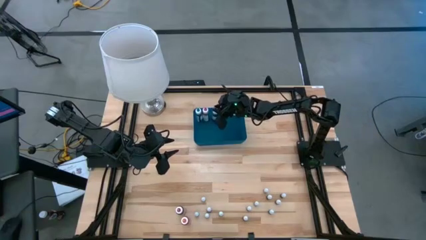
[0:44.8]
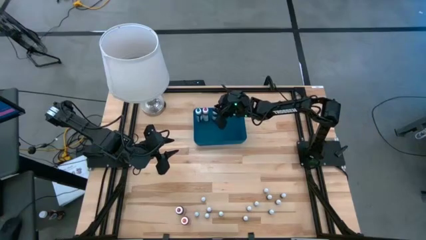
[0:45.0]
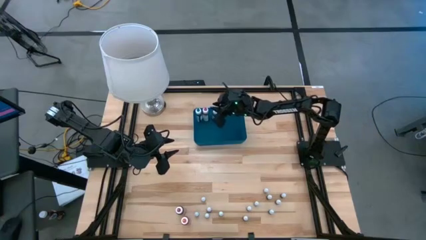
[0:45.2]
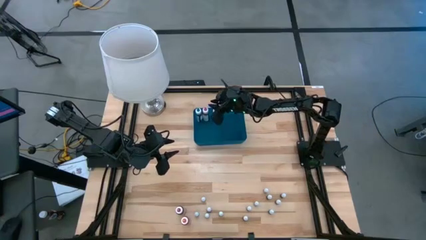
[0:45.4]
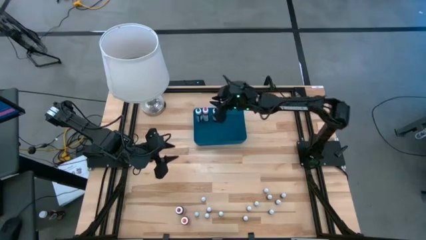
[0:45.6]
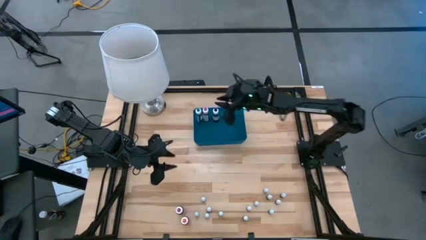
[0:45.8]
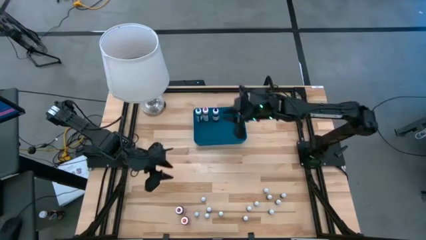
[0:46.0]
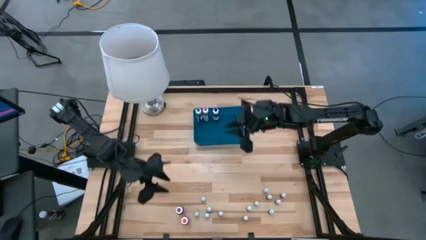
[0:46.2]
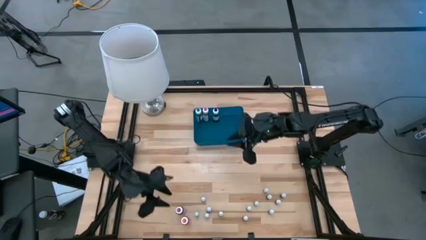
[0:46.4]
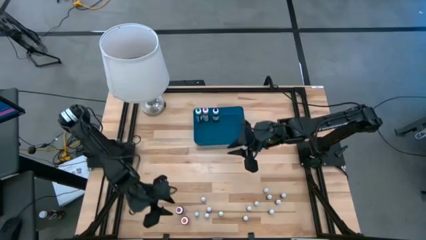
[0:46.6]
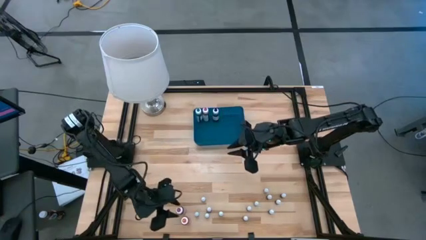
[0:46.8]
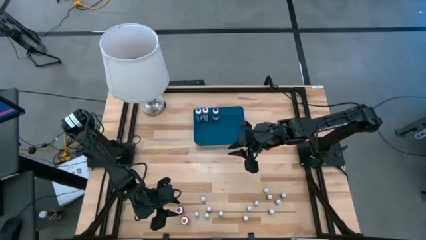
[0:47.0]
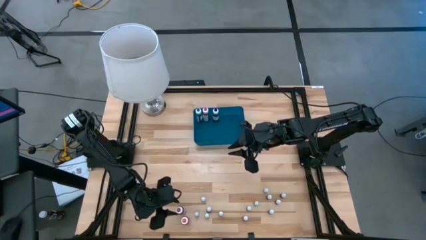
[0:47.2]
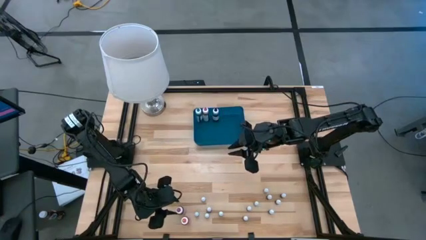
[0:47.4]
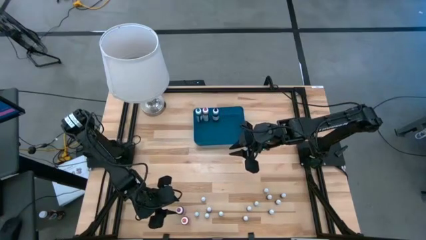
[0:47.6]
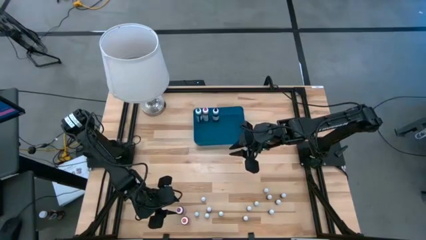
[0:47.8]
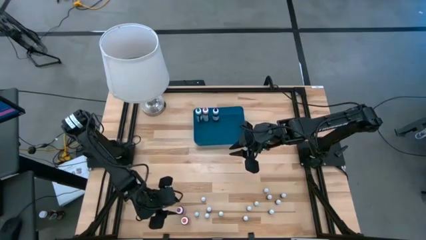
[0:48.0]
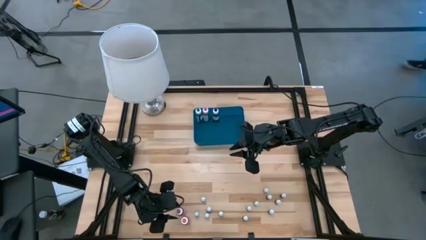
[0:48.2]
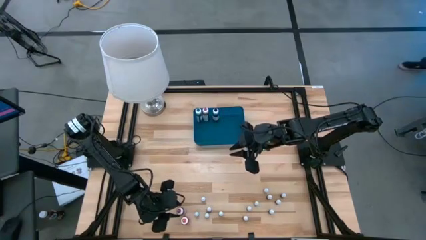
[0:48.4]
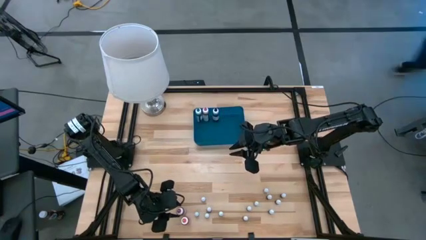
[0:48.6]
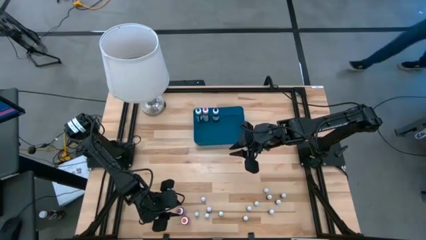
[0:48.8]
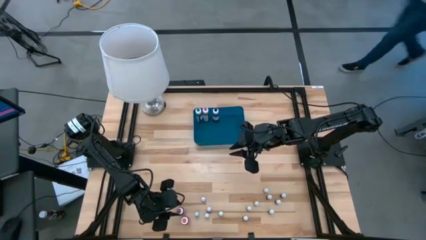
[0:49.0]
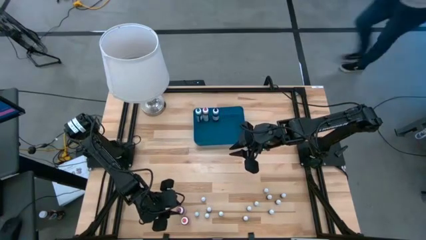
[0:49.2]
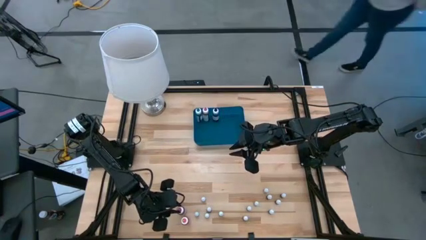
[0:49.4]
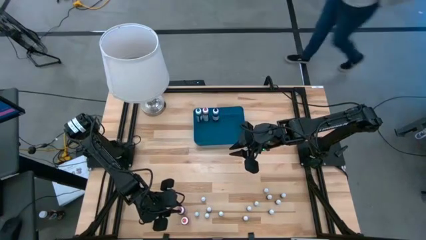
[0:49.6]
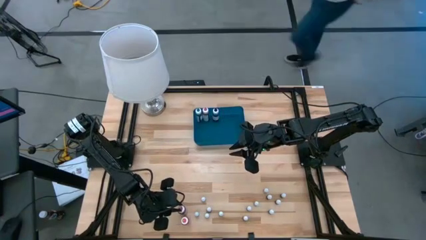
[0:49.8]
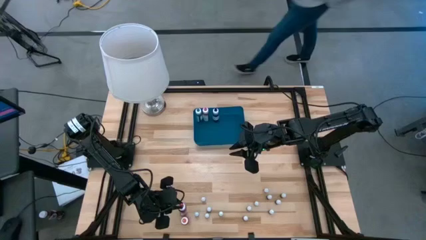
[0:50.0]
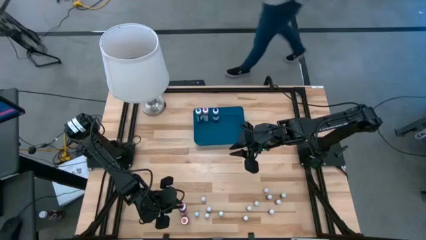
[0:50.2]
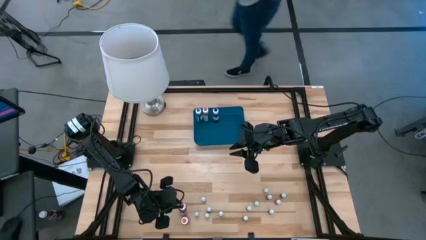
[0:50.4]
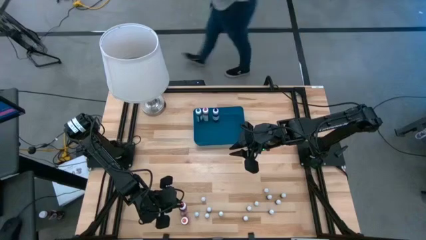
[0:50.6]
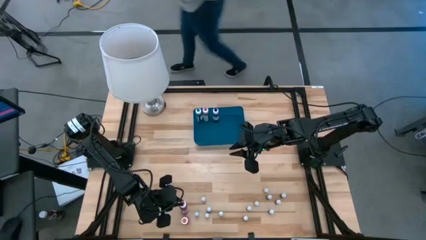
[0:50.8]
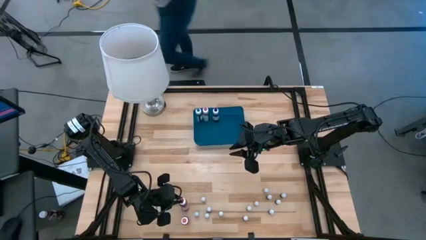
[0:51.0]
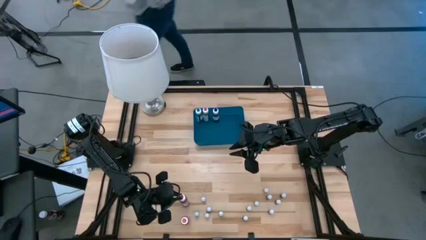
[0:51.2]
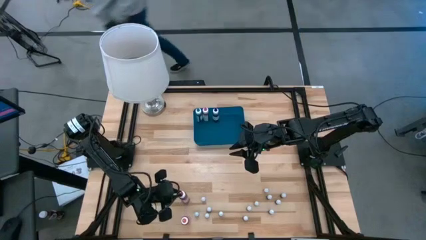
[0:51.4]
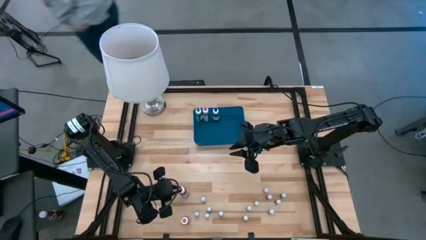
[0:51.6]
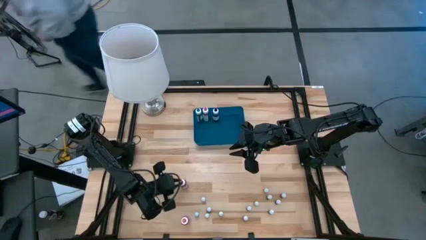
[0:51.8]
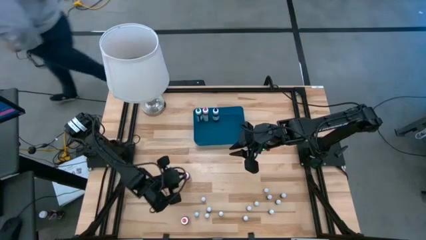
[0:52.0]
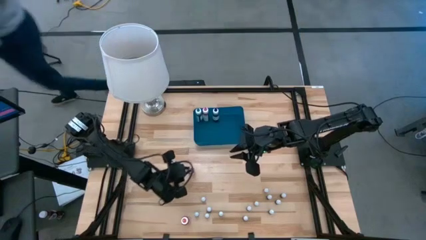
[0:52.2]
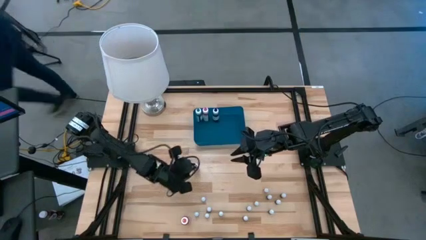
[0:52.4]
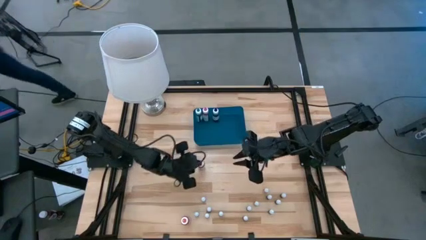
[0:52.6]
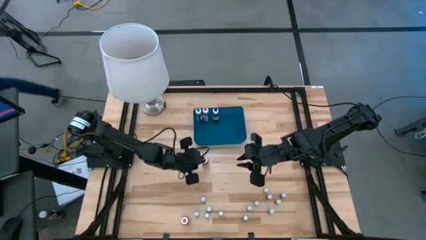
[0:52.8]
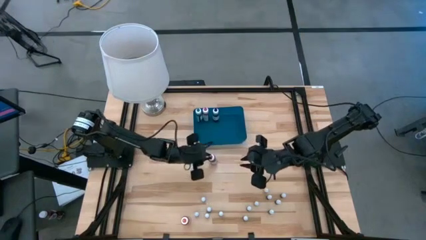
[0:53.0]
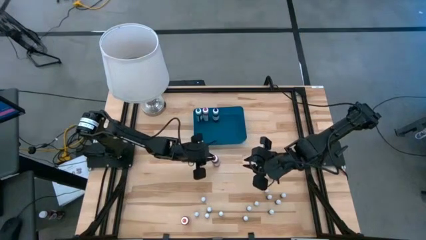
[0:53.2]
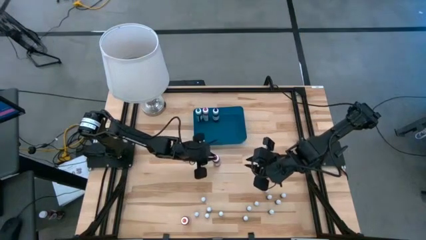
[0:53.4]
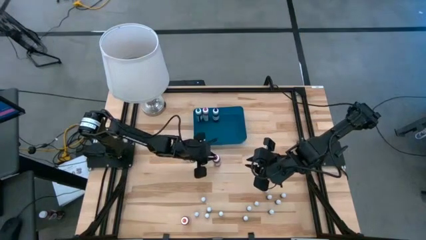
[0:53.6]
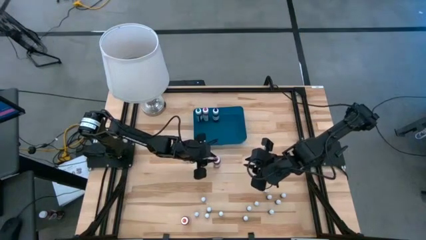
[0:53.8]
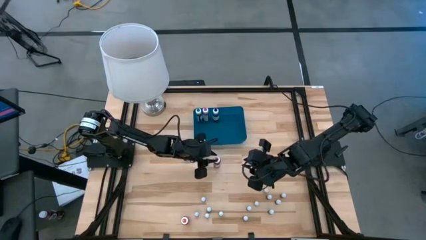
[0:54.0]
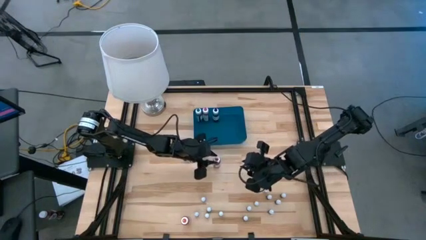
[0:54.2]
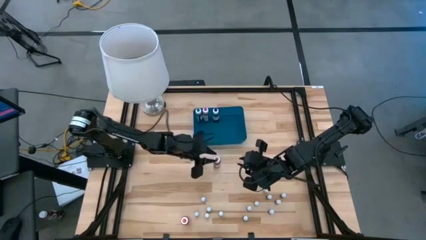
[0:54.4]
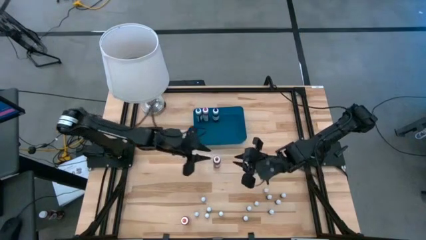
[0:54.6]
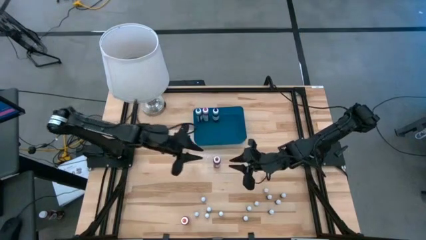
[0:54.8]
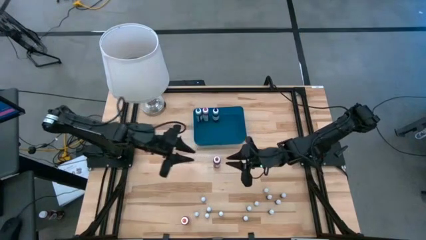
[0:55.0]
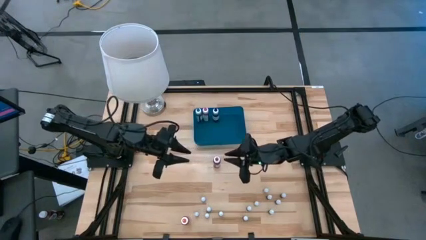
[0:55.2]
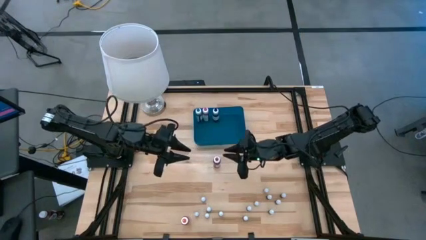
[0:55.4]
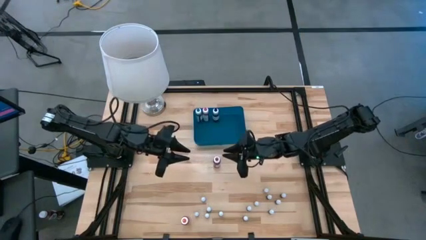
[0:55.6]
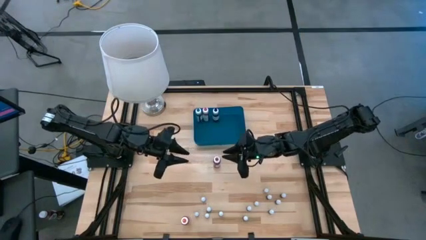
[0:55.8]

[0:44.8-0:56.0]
Task: Pick & Place food coloring
Put the large red food coloring bottle into the bin
